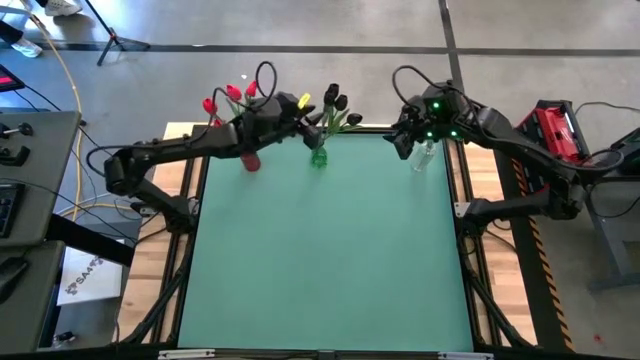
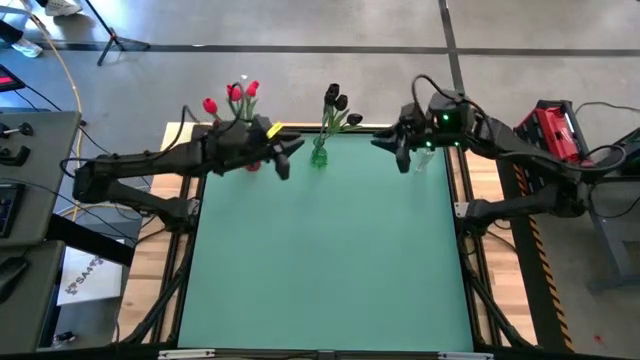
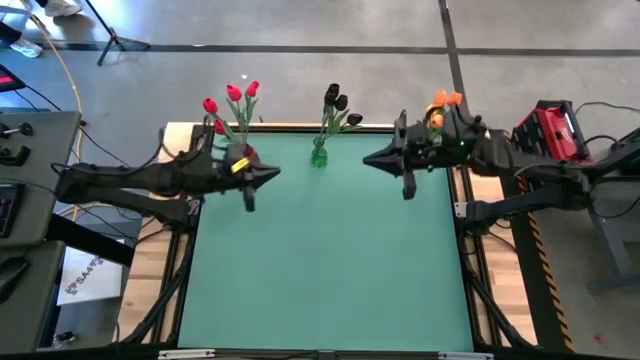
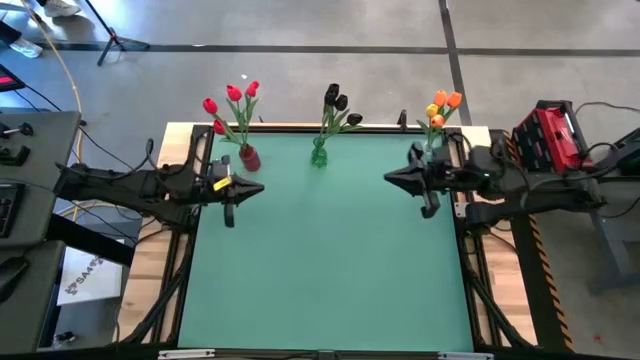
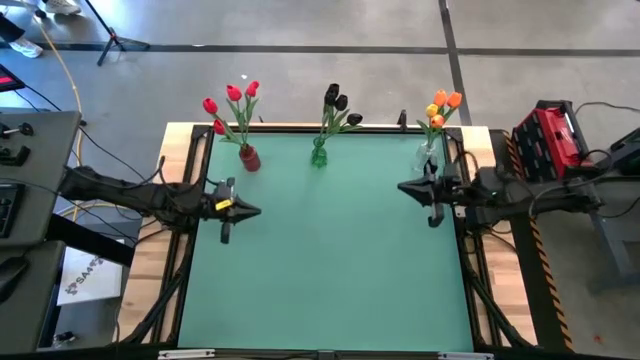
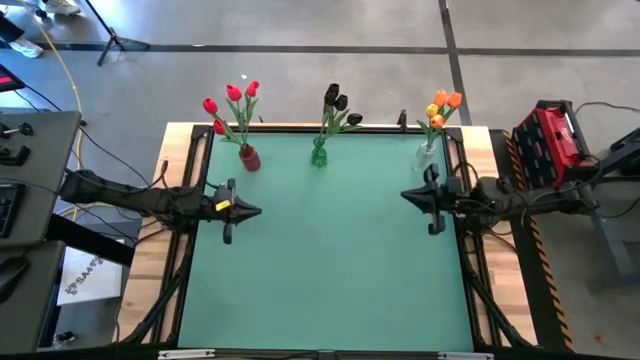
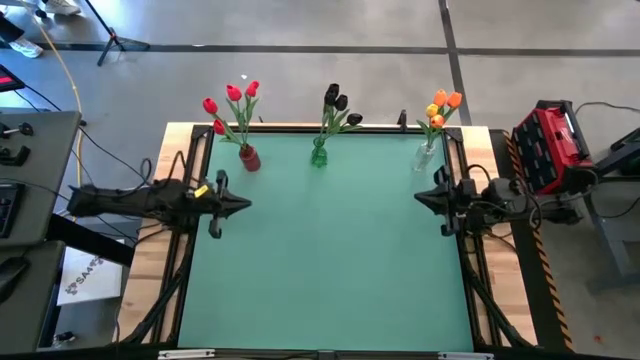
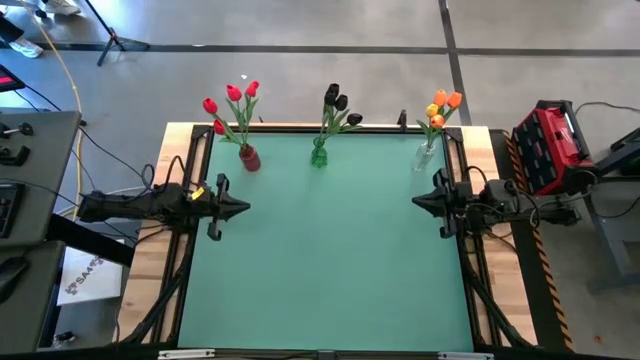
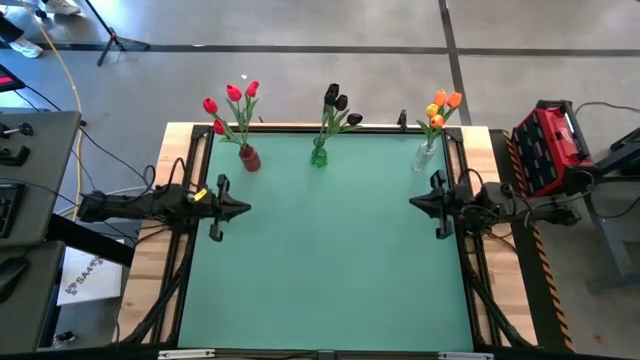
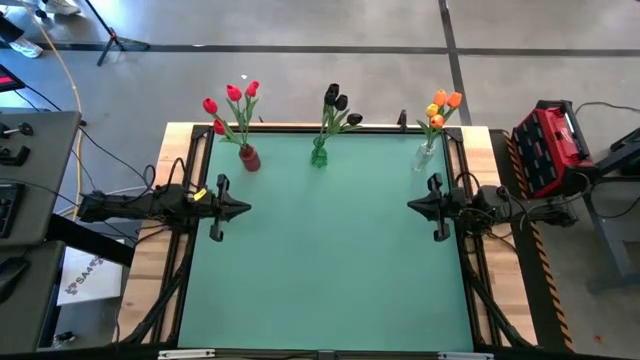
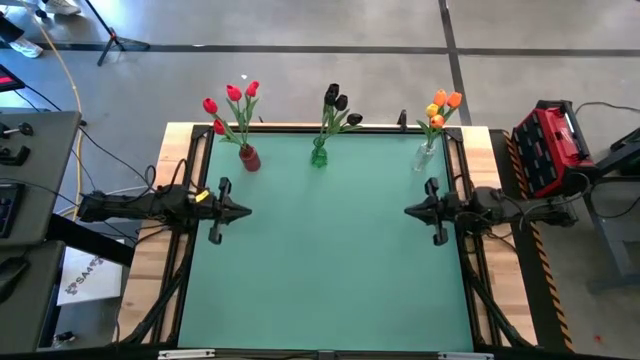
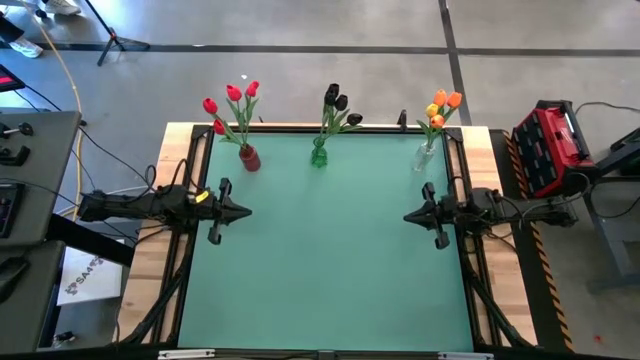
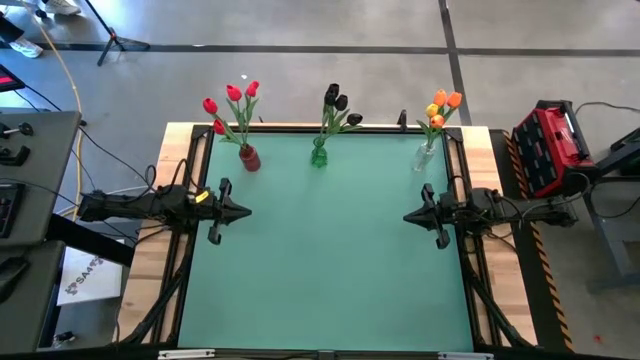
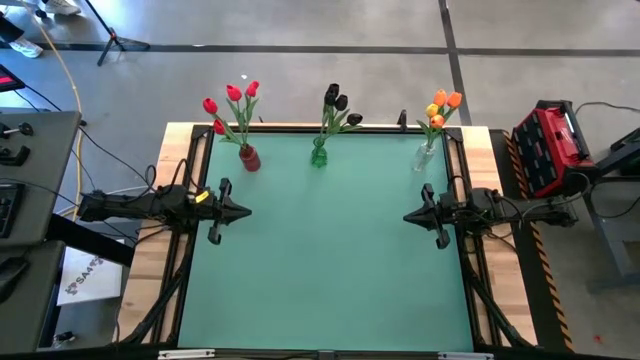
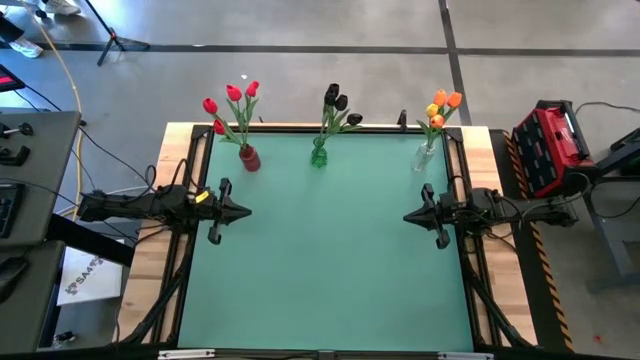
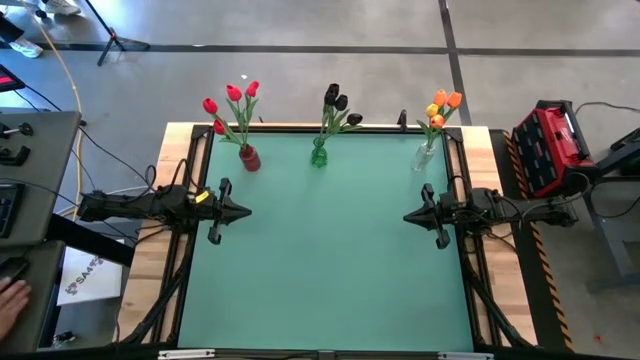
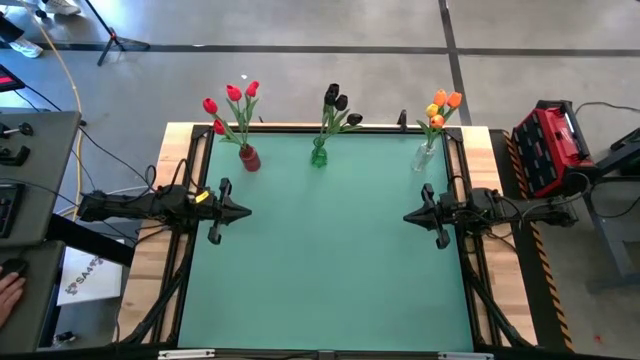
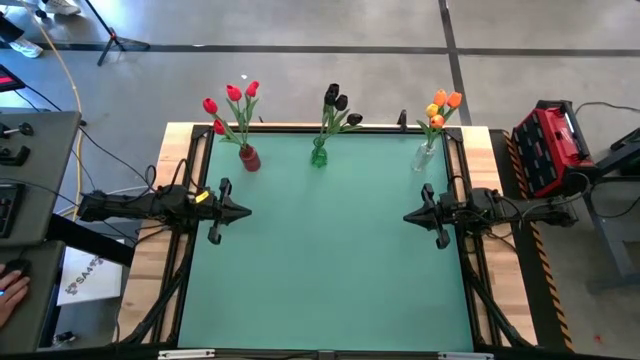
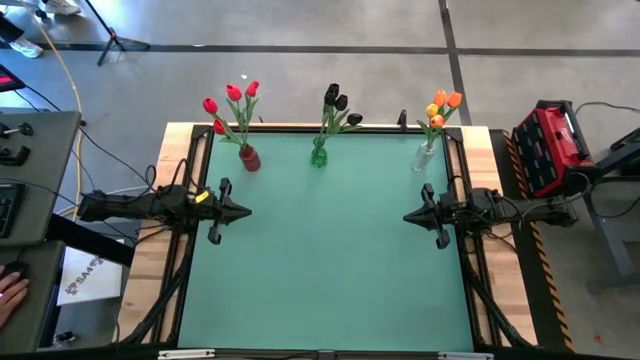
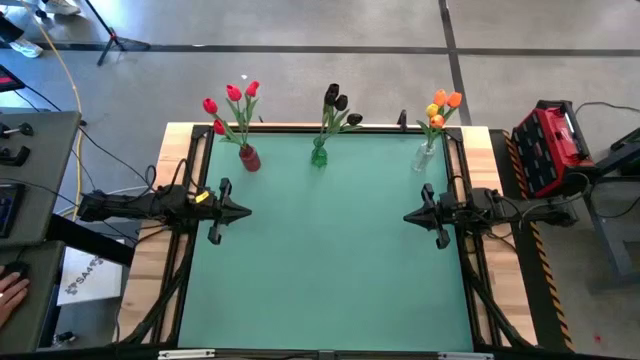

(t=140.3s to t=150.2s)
Task: Sort flowers into vase by color
Return to Home Position

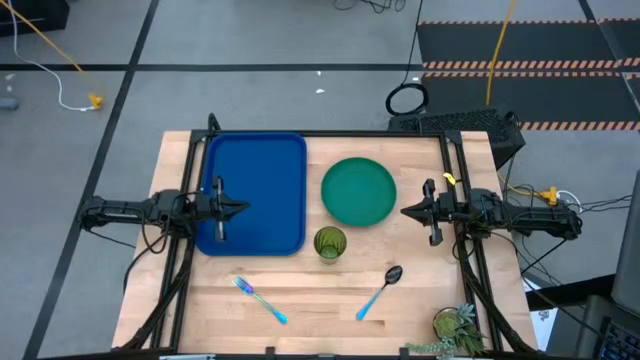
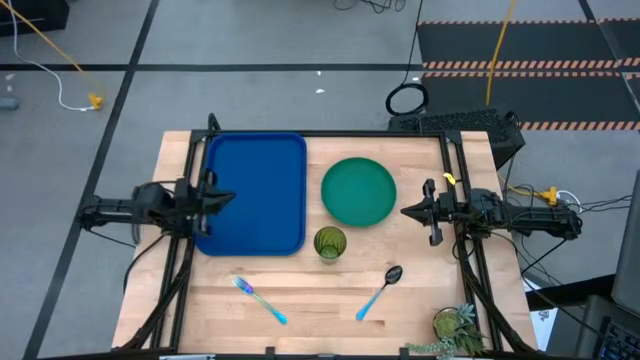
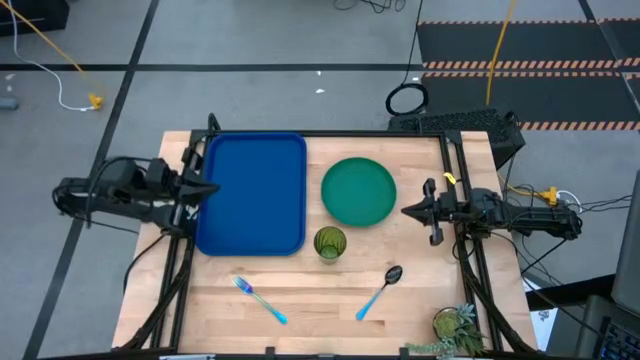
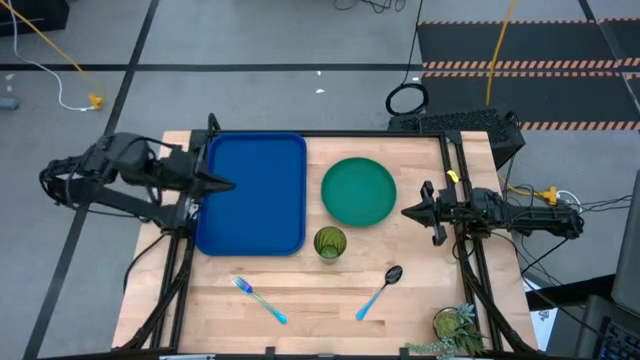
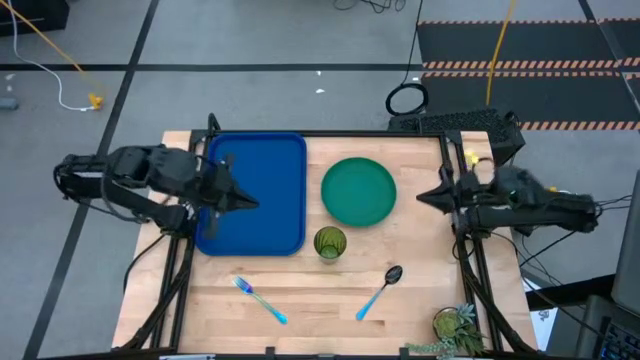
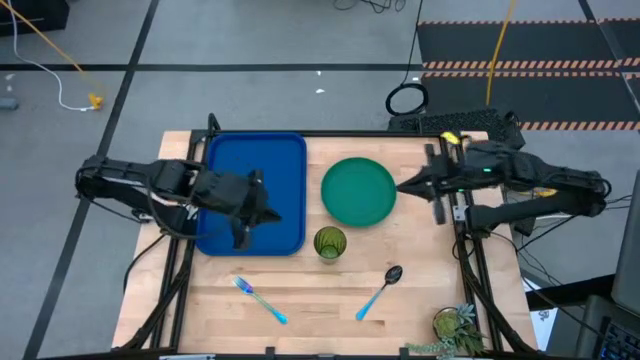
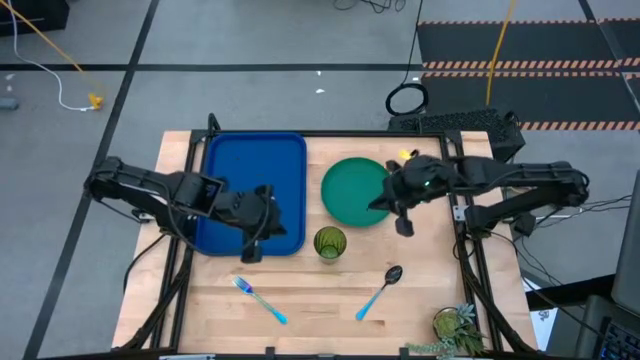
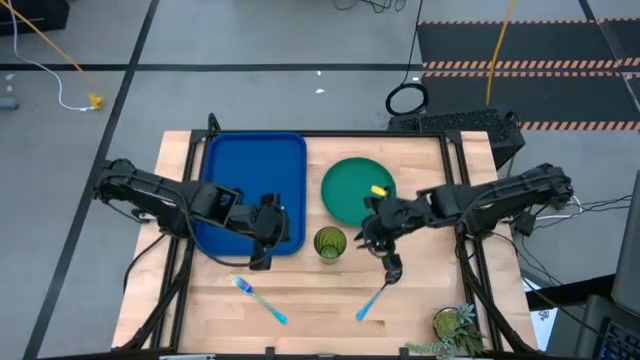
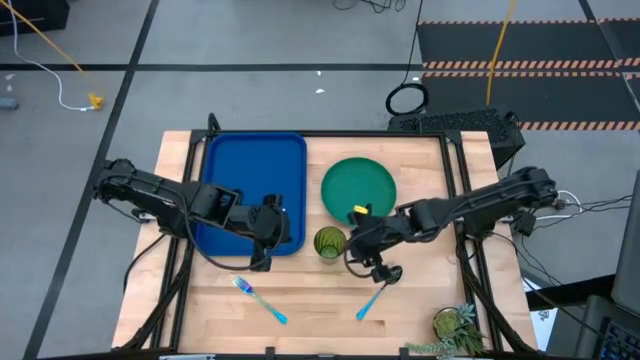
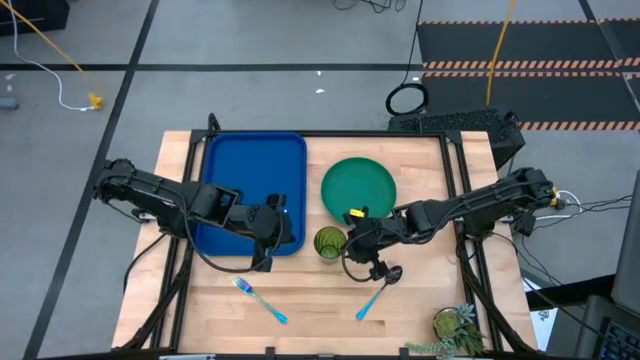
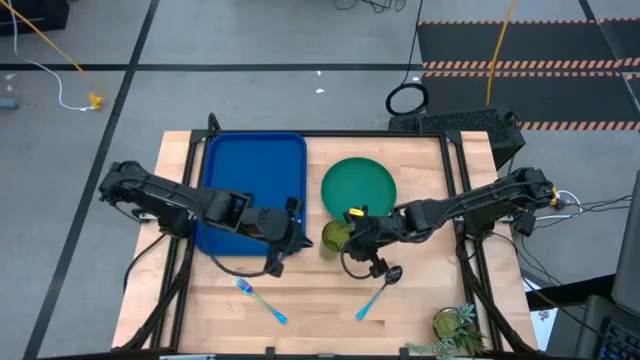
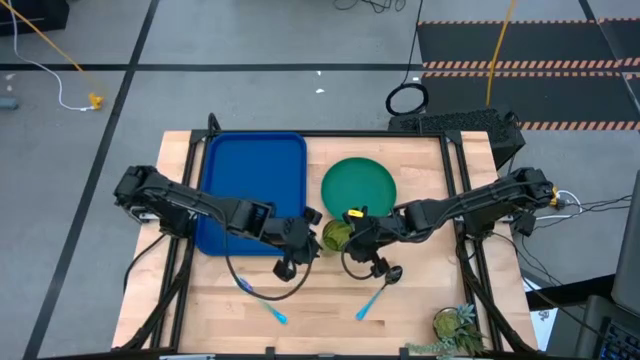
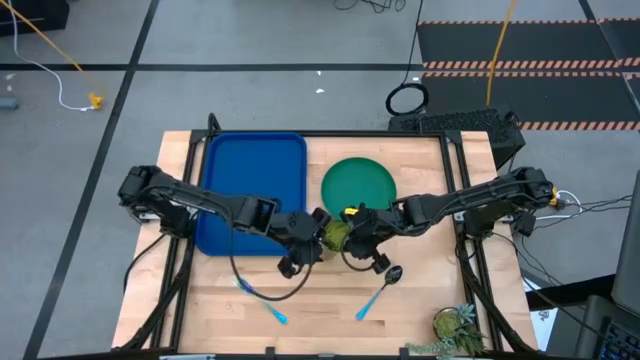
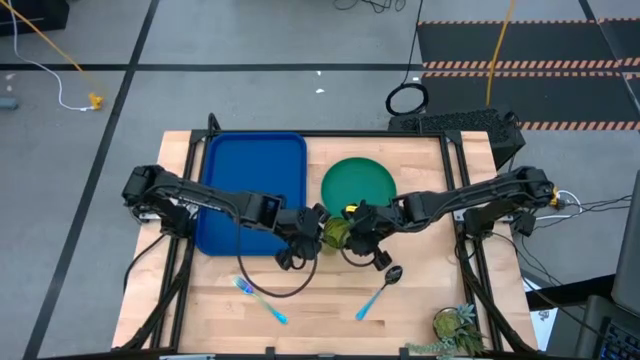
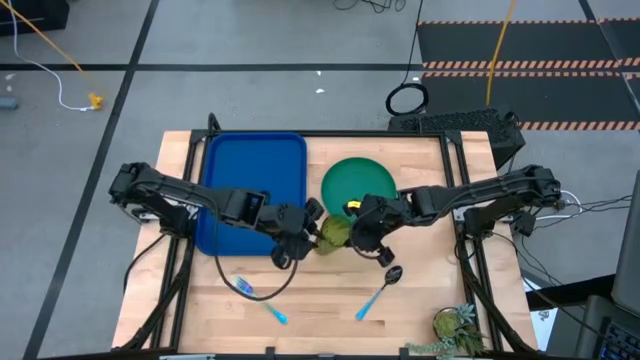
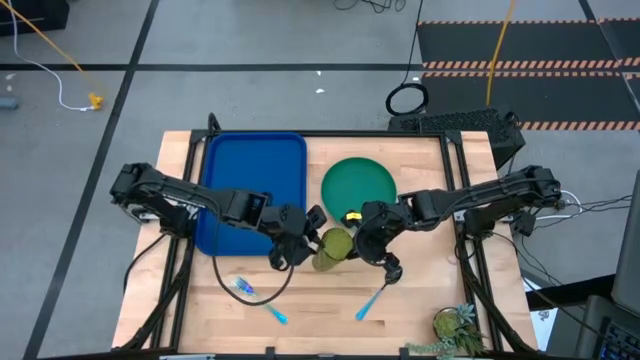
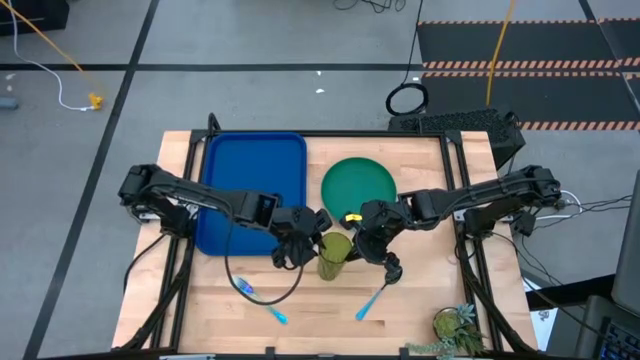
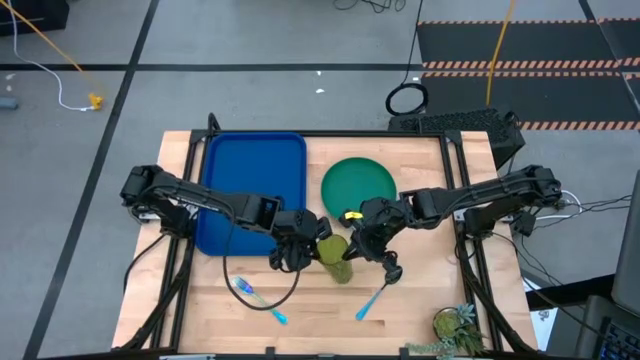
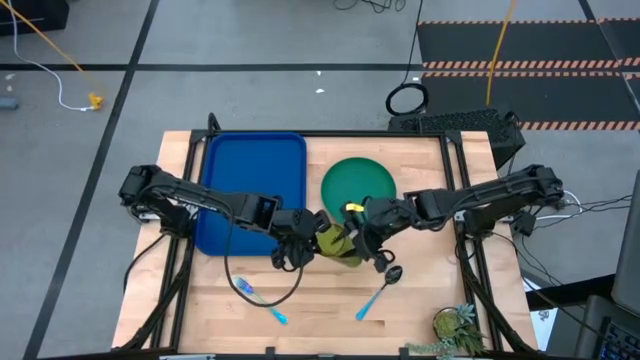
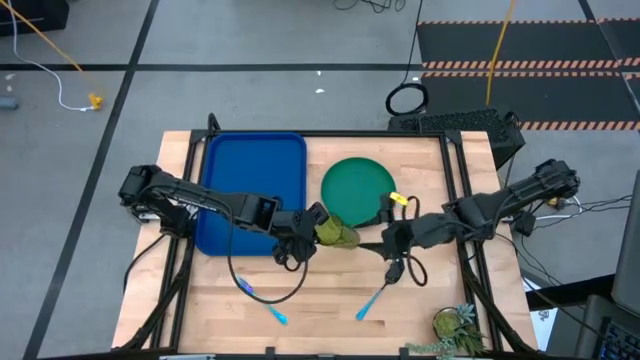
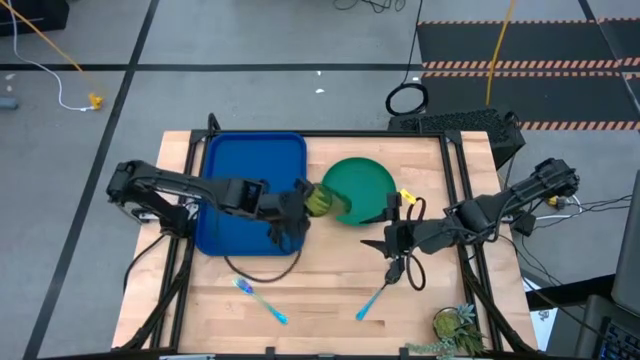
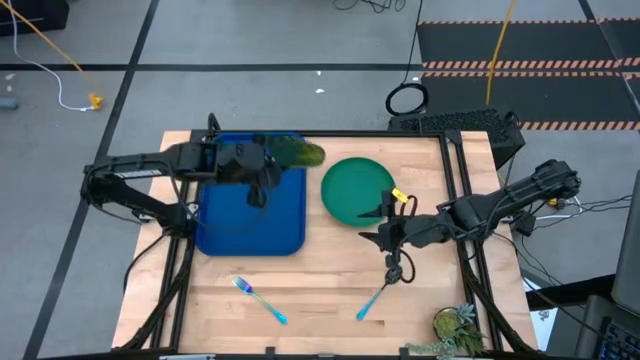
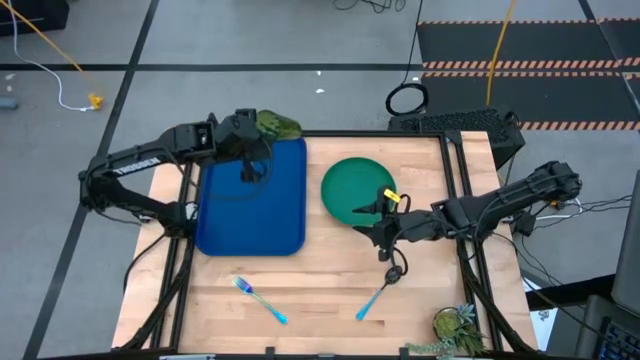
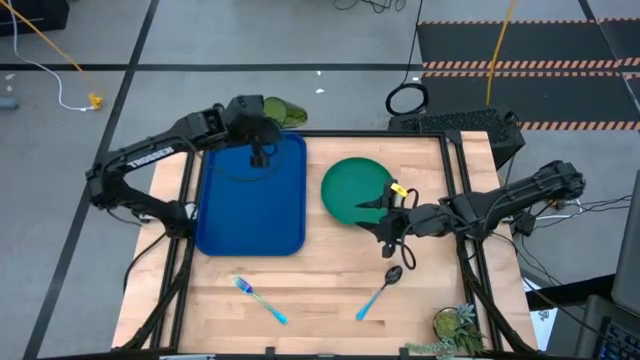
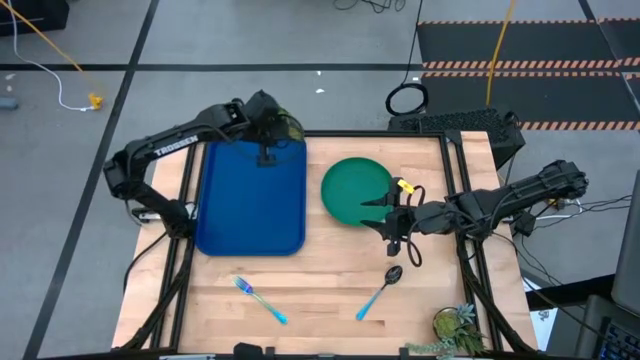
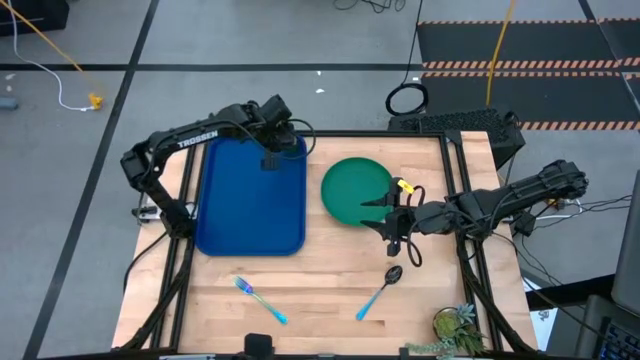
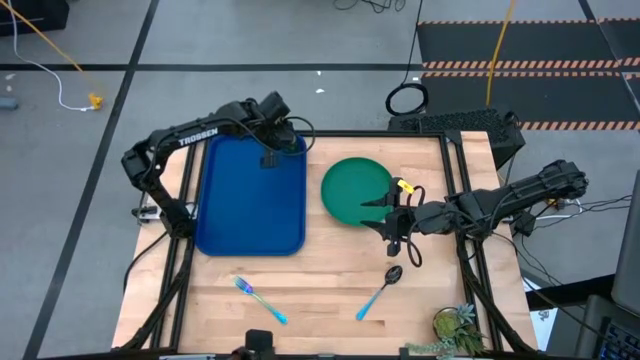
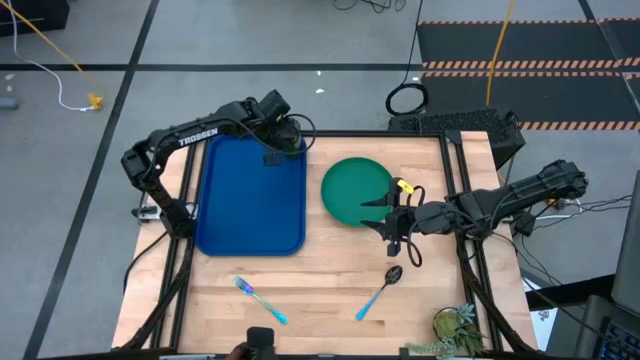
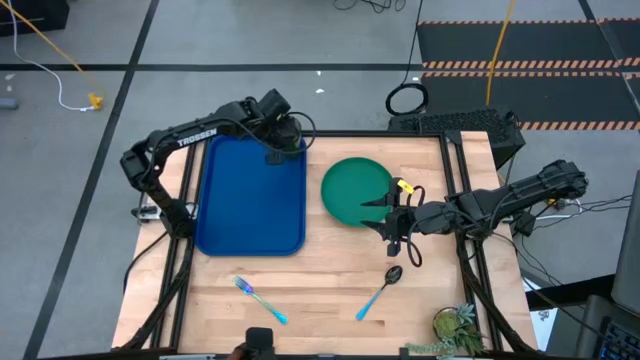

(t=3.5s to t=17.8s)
Task: Pick and place plate/cup/fork/spoon on tray
Put the green cup on the top right of the serving tray
